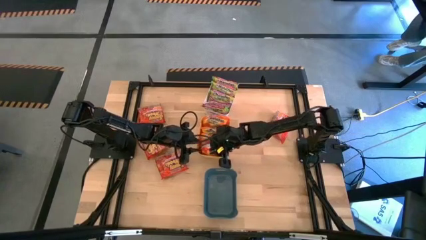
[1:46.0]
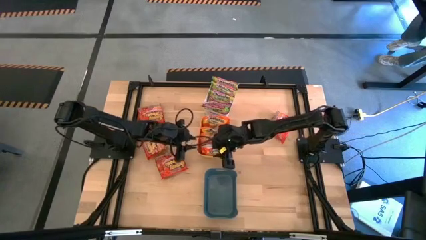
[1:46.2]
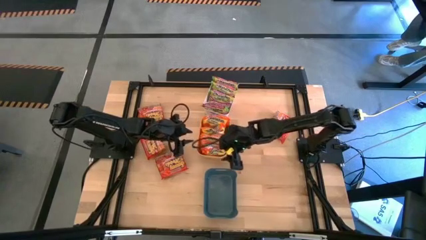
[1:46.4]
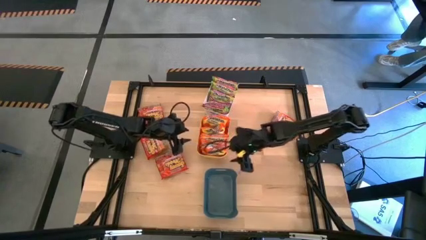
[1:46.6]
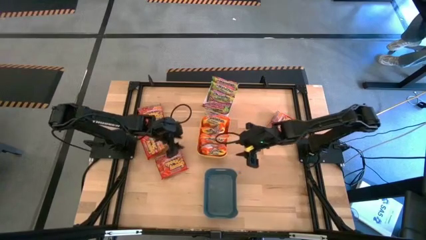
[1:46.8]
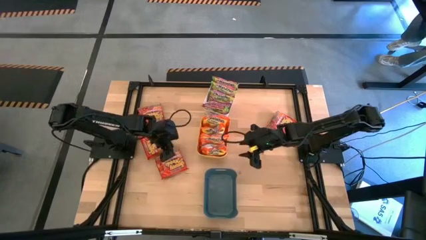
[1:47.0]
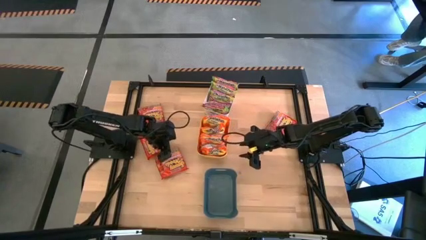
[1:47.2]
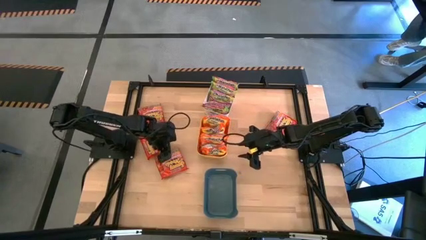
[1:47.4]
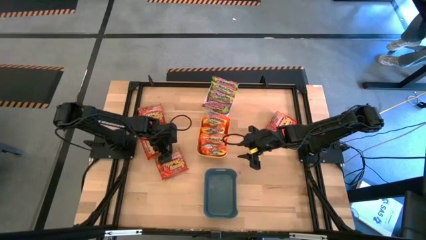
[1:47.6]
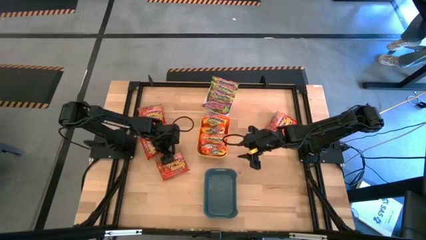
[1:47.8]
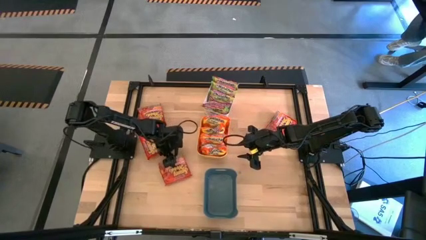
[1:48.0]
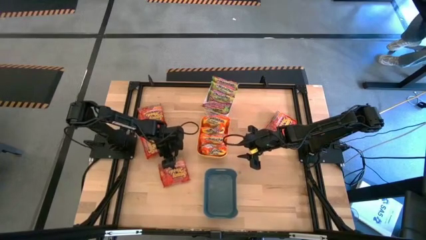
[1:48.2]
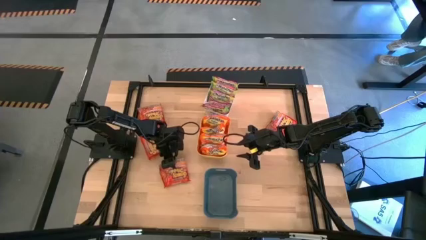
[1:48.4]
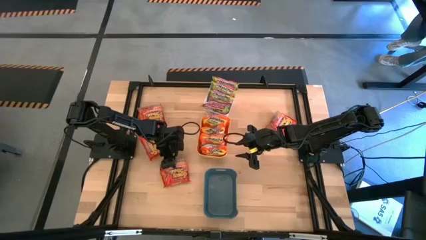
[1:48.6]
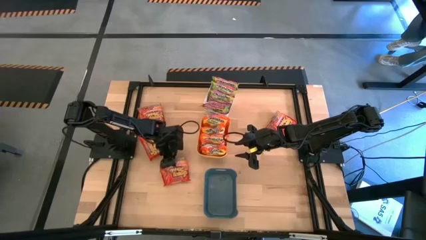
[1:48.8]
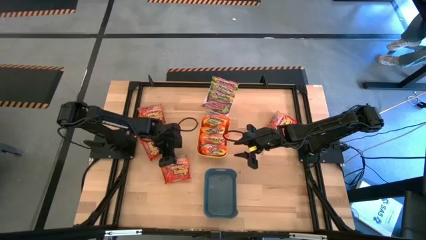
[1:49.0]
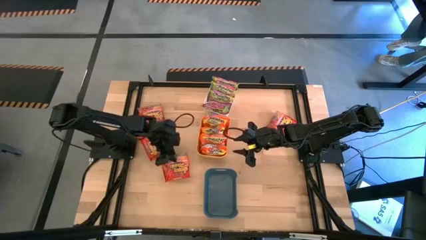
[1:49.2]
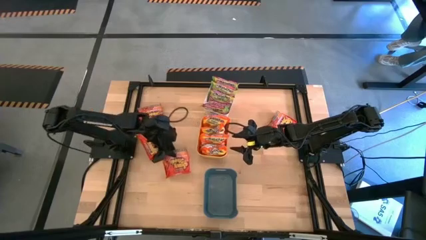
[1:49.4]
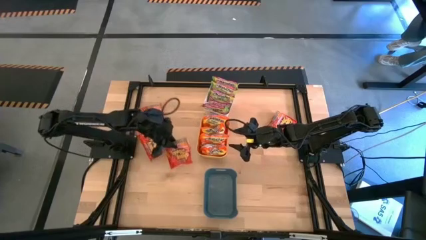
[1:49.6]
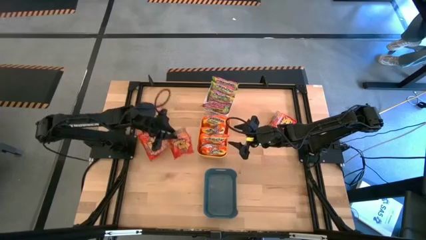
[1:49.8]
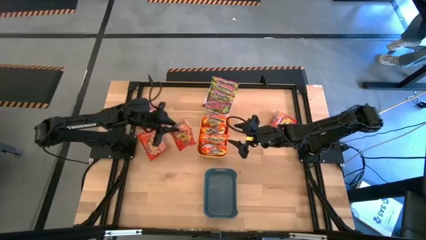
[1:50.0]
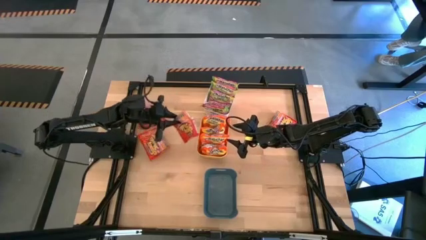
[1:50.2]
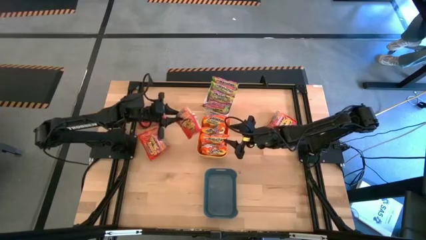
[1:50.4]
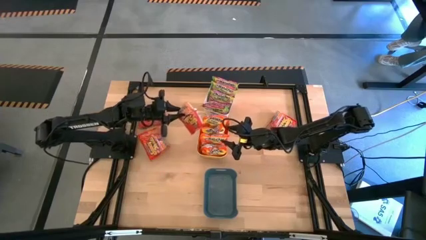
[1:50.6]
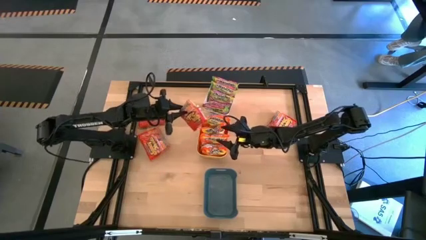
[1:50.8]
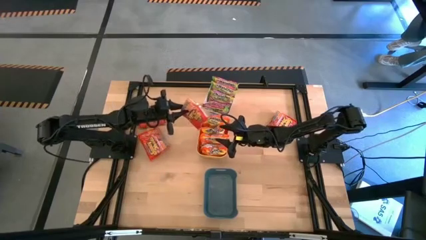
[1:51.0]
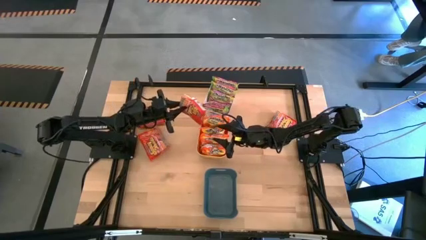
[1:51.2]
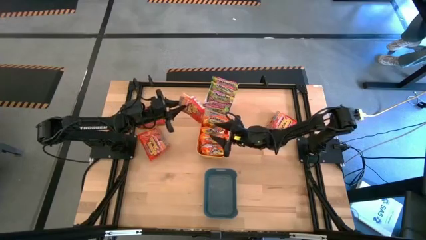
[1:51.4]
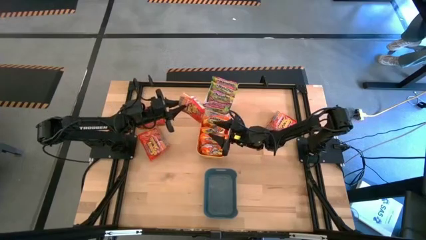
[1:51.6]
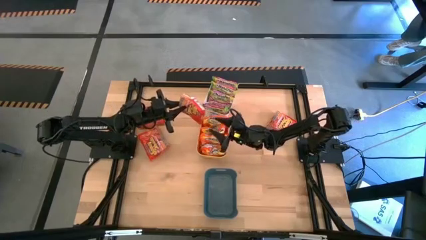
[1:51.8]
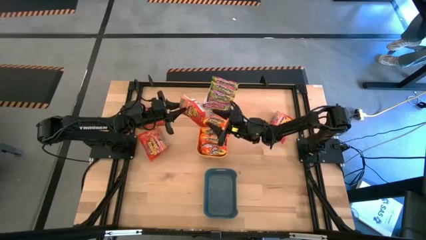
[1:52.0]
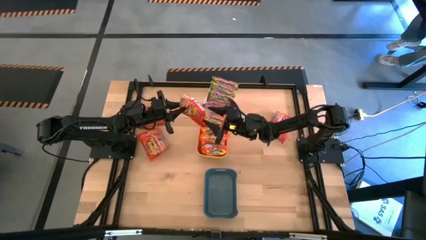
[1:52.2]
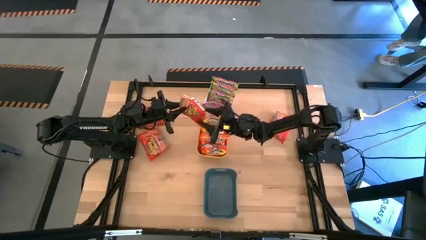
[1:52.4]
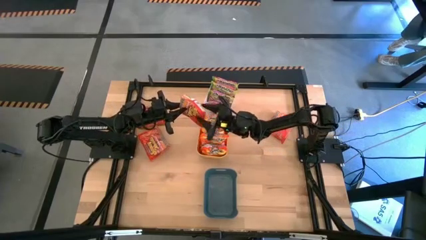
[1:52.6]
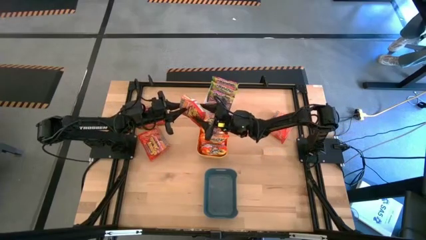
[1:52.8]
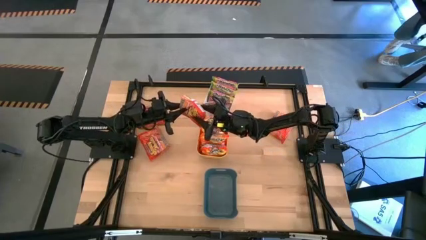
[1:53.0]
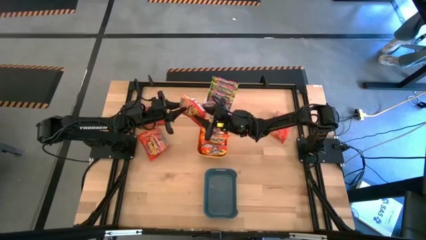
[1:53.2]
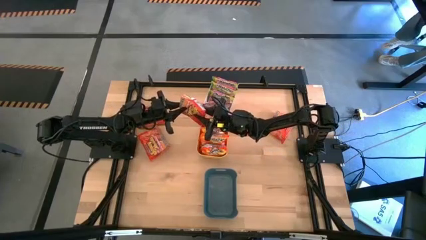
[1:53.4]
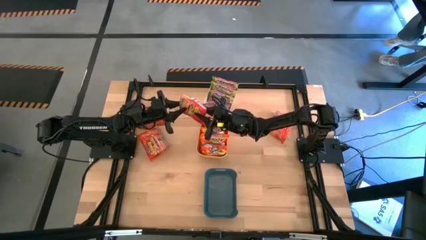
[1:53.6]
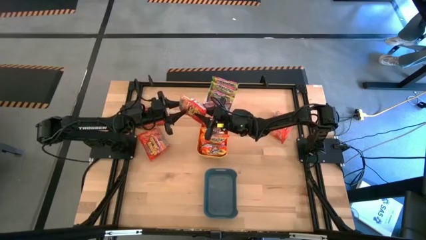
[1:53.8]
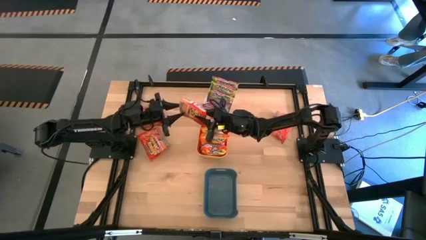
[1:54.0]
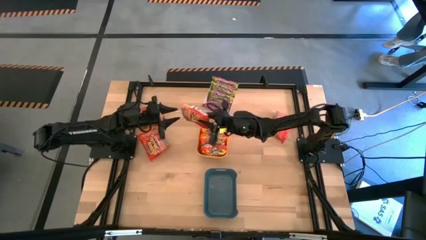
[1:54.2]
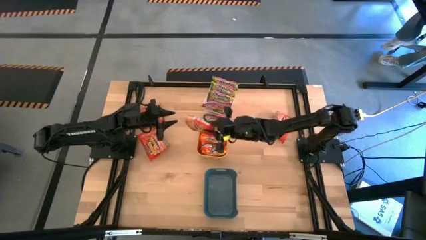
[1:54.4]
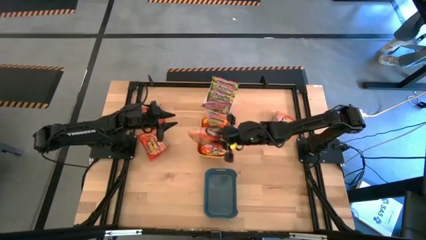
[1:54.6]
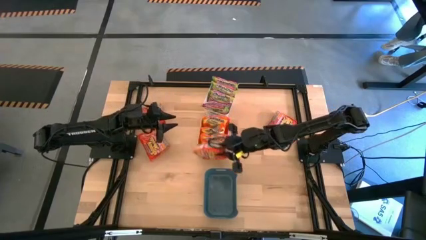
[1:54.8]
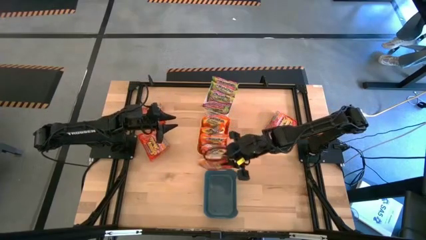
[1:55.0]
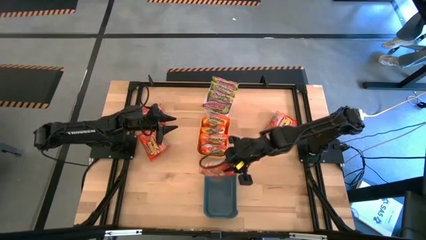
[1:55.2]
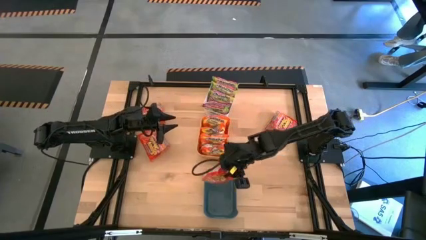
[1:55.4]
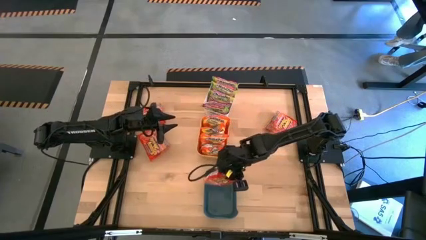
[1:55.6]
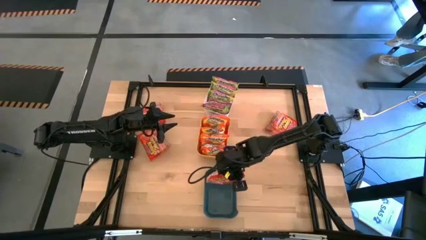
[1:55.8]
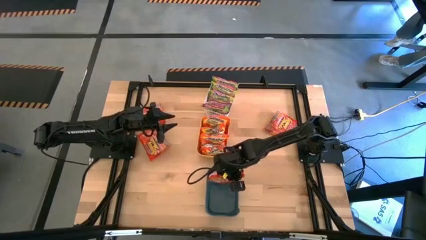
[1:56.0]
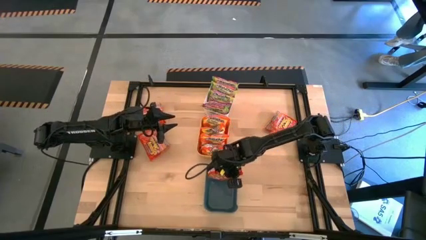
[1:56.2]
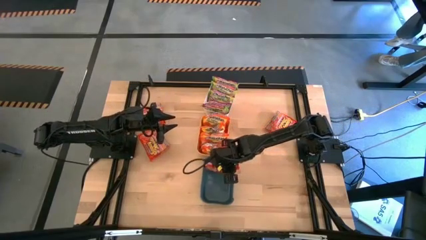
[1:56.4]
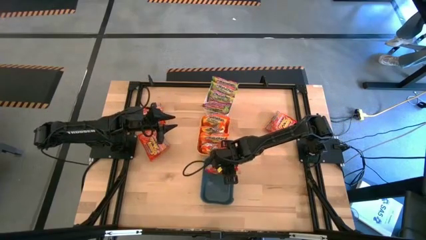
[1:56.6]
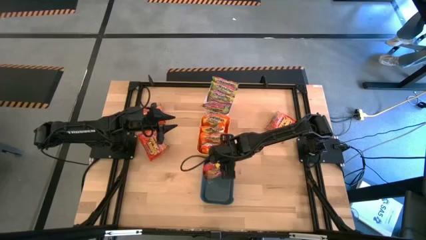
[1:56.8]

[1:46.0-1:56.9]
Task: Sort Maruchan noodles
Put the orange noodle pack into the blue bin

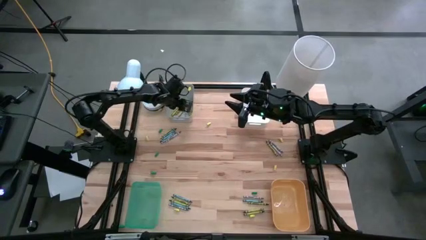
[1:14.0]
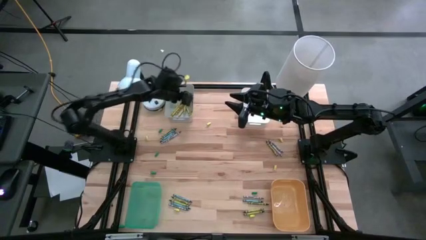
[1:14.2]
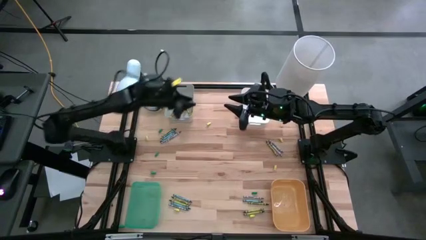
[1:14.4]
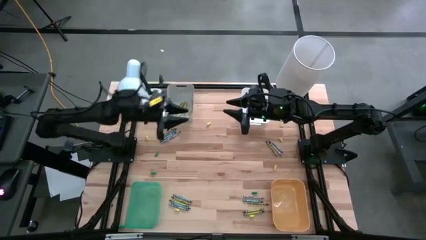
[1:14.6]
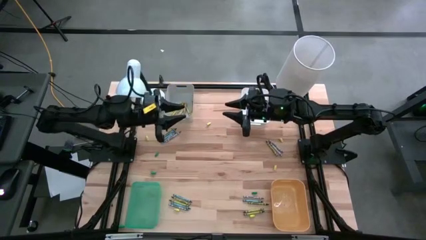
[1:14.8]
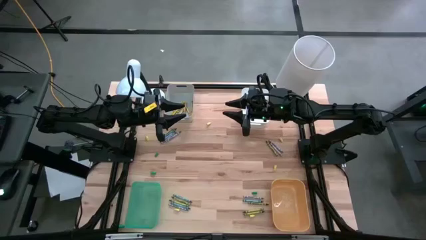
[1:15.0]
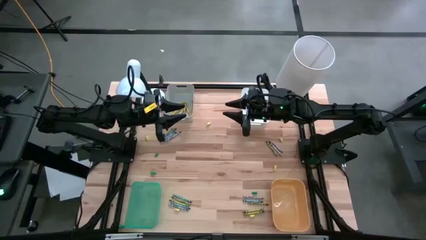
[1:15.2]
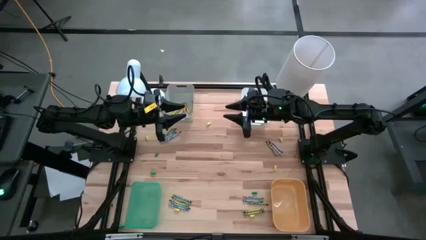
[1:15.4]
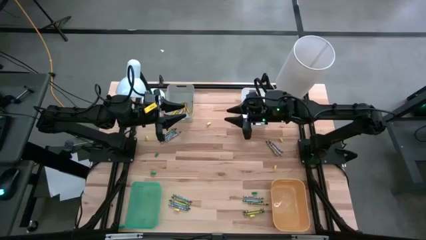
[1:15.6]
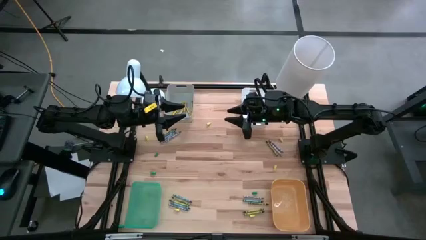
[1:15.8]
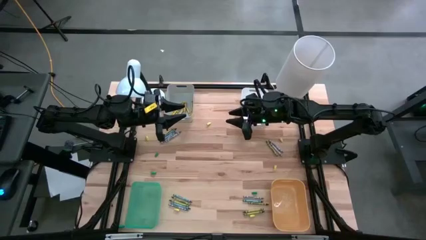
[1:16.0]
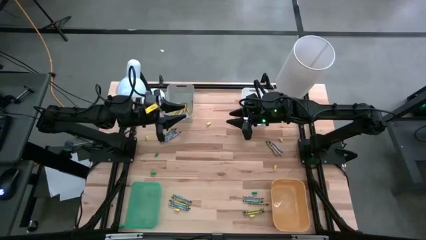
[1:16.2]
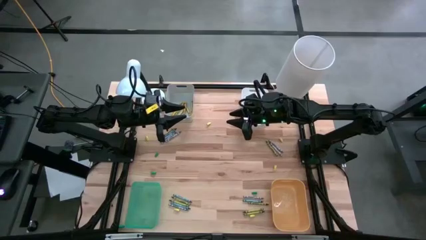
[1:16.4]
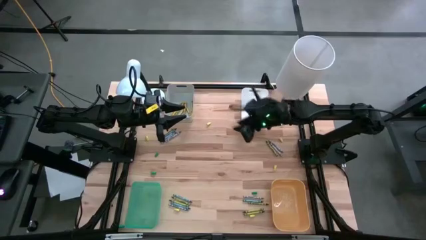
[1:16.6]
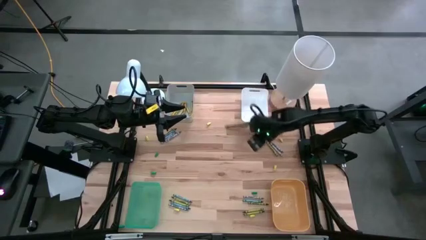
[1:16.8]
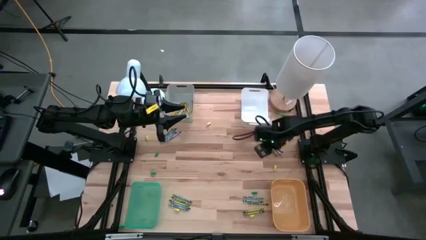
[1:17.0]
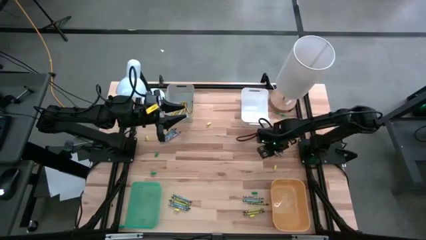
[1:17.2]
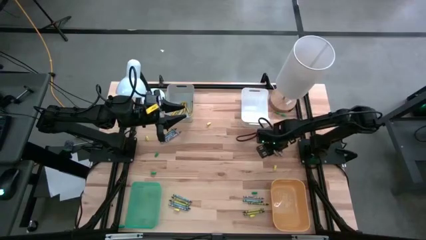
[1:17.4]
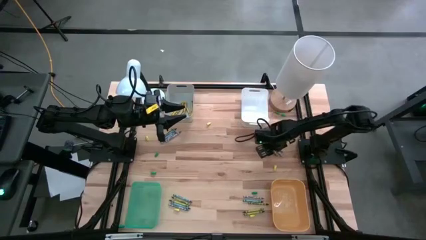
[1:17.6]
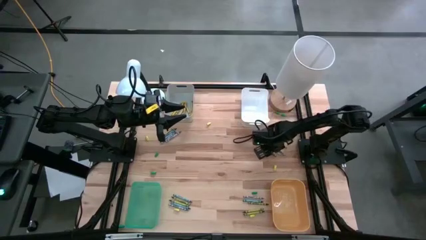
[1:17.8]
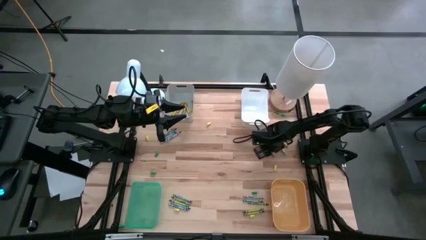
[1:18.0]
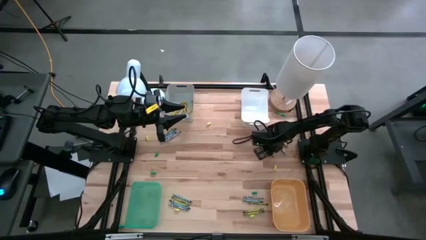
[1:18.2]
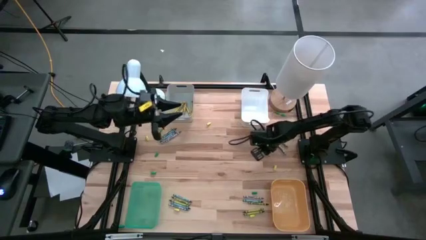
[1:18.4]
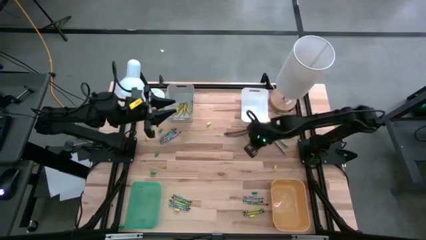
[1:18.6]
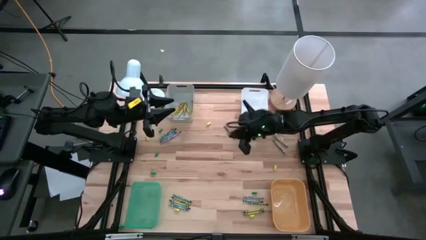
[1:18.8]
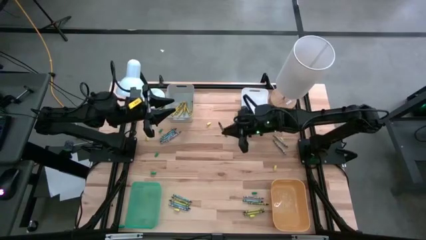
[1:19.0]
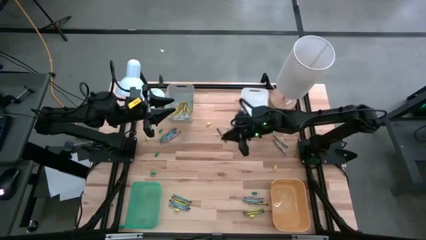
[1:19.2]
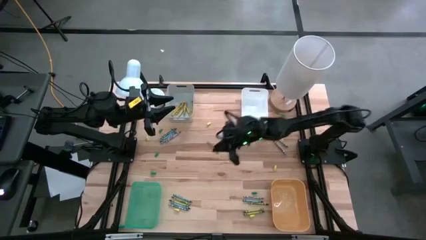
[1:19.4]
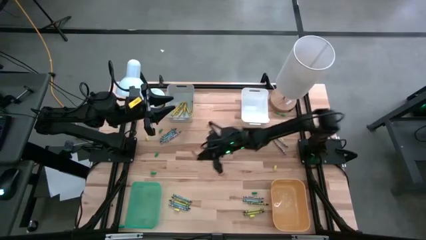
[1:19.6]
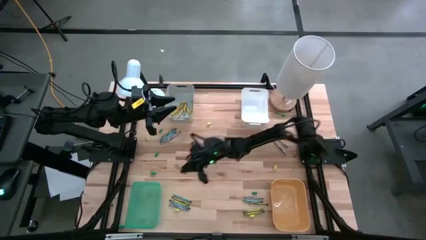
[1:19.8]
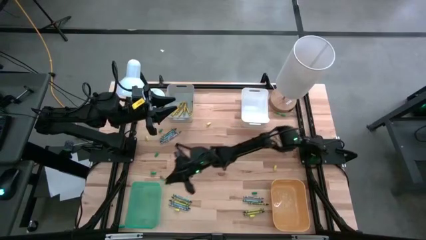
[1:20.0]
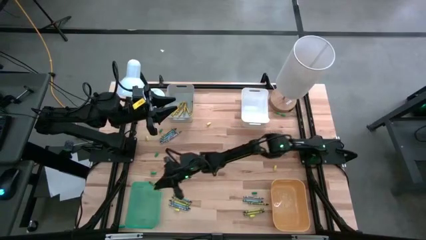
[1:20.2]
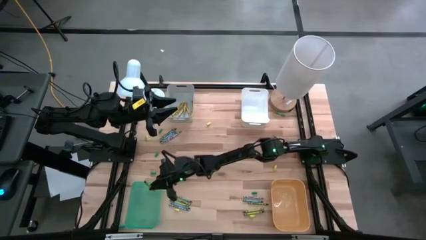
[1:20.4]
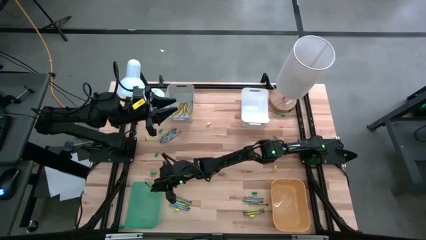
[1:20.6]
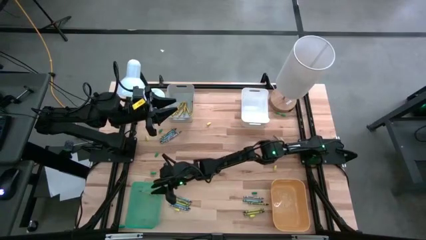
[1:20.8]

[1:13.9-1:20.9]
Task: Sort crayons
Put the green crayon into the green bin
